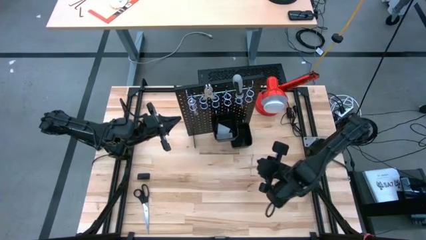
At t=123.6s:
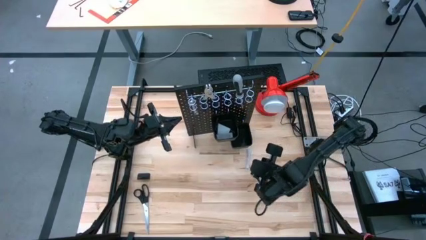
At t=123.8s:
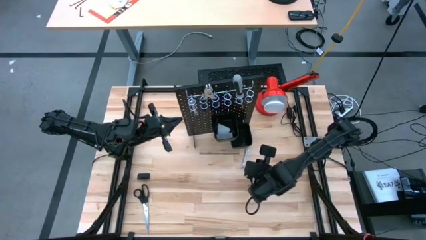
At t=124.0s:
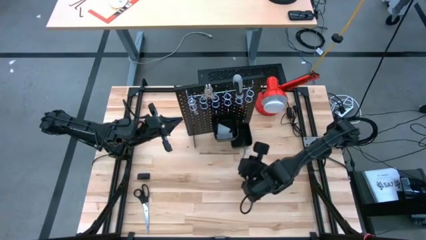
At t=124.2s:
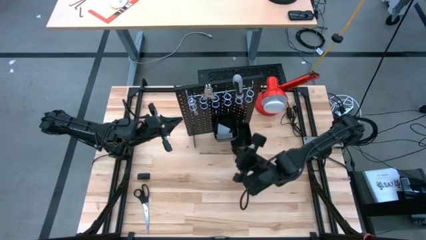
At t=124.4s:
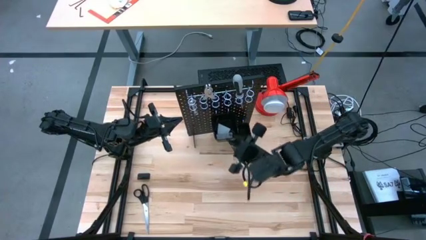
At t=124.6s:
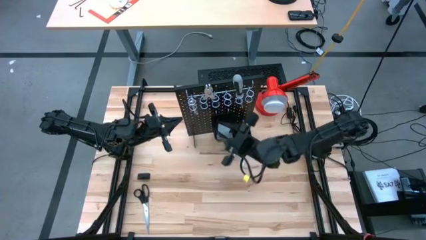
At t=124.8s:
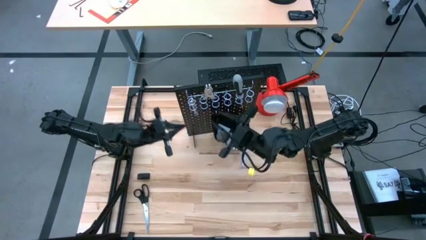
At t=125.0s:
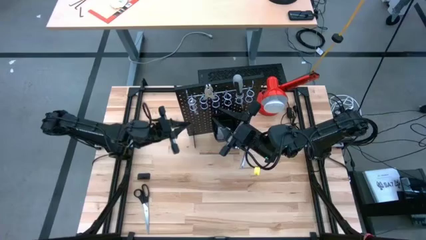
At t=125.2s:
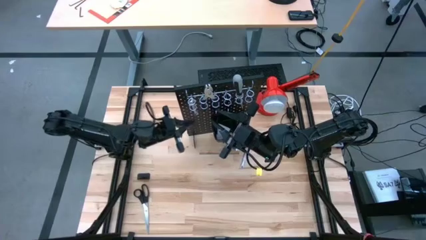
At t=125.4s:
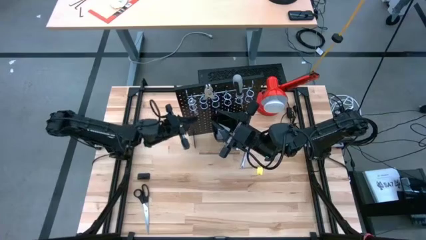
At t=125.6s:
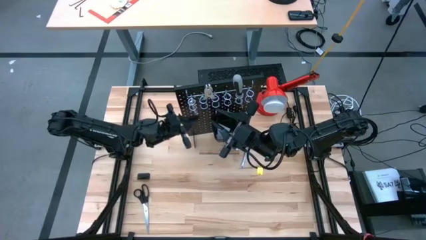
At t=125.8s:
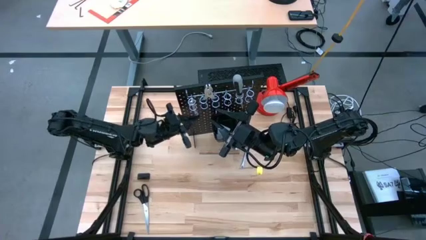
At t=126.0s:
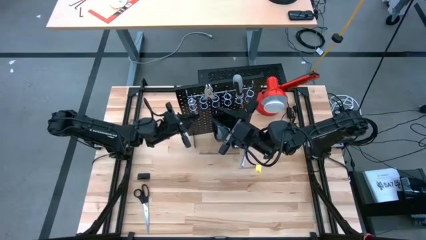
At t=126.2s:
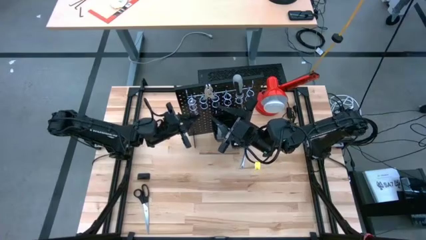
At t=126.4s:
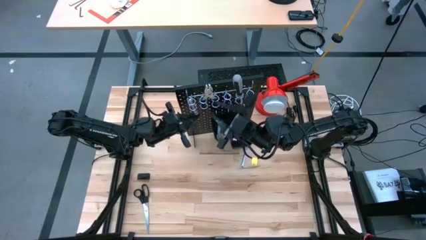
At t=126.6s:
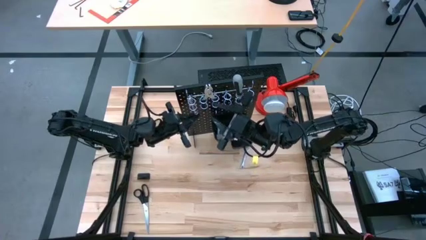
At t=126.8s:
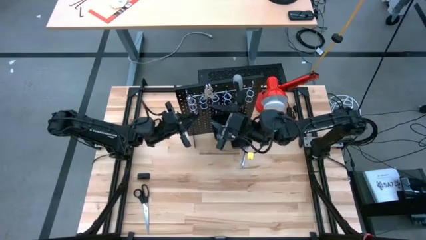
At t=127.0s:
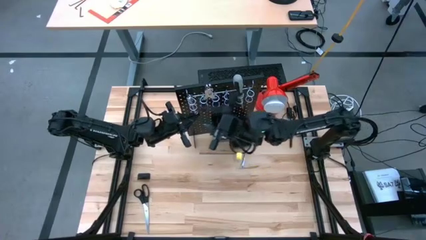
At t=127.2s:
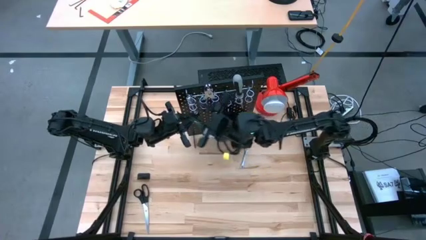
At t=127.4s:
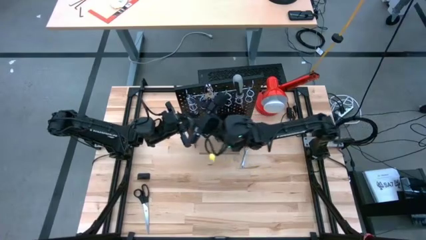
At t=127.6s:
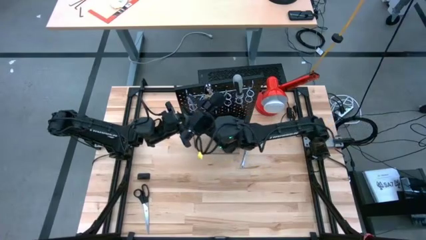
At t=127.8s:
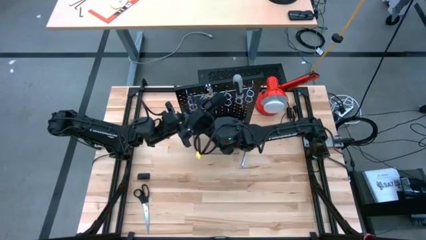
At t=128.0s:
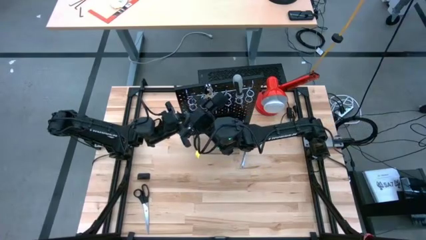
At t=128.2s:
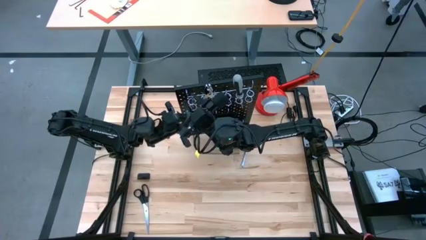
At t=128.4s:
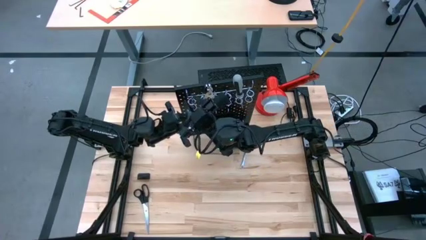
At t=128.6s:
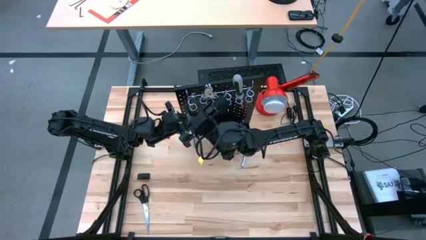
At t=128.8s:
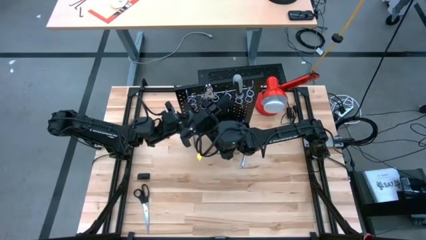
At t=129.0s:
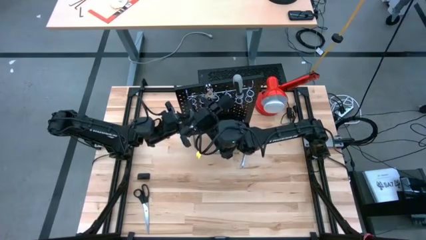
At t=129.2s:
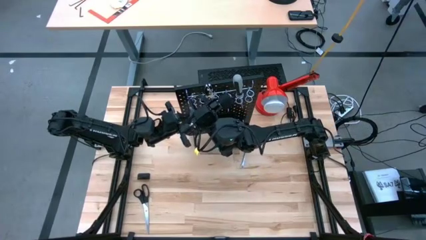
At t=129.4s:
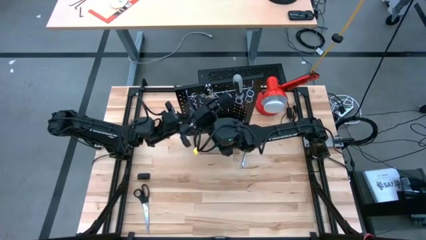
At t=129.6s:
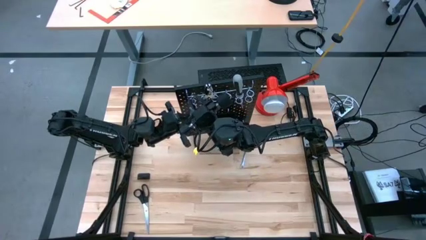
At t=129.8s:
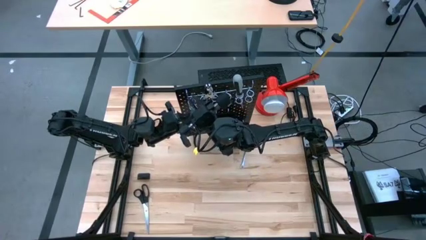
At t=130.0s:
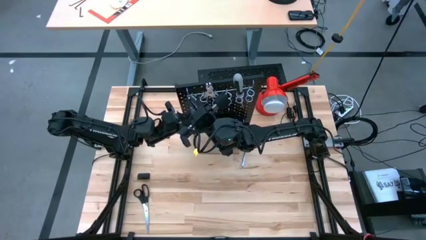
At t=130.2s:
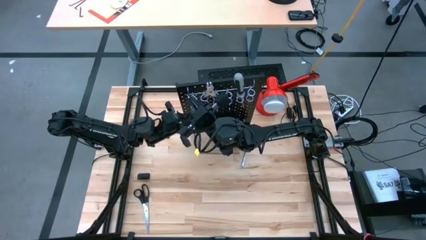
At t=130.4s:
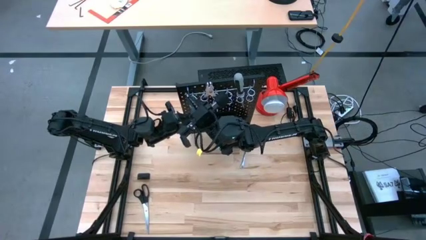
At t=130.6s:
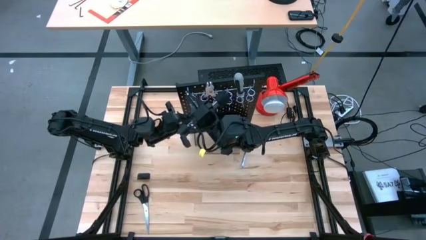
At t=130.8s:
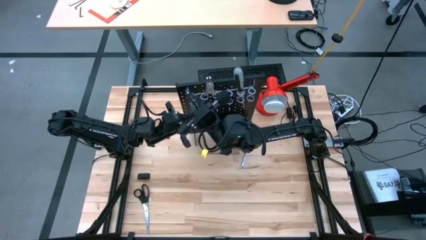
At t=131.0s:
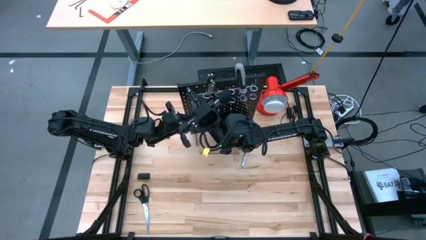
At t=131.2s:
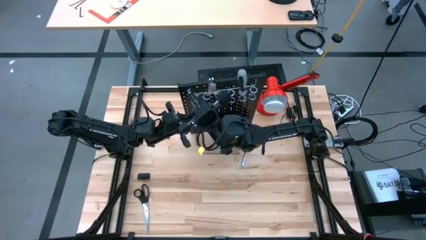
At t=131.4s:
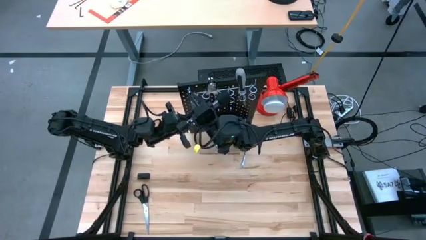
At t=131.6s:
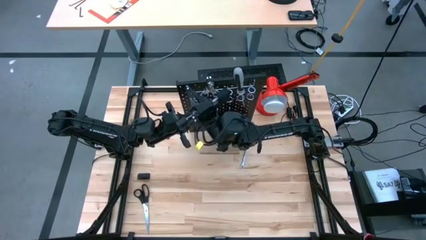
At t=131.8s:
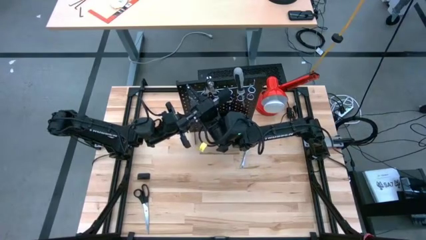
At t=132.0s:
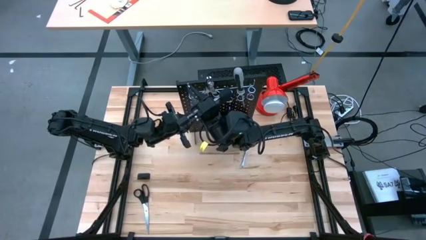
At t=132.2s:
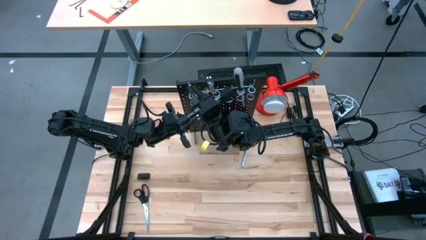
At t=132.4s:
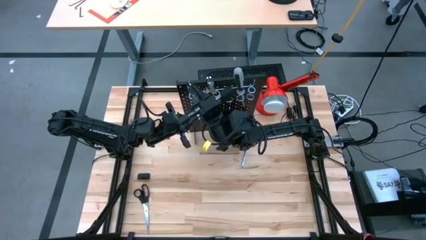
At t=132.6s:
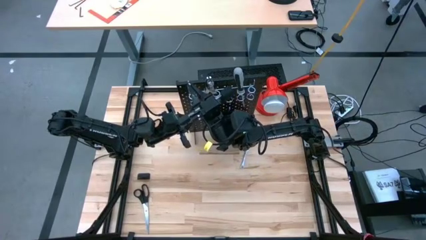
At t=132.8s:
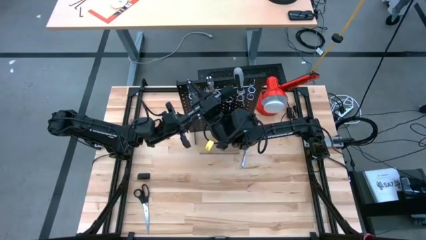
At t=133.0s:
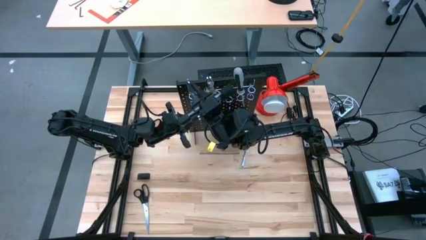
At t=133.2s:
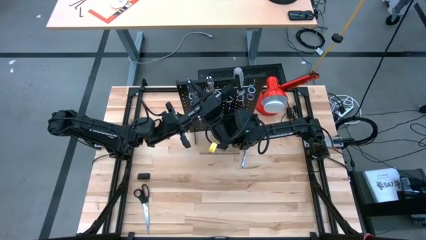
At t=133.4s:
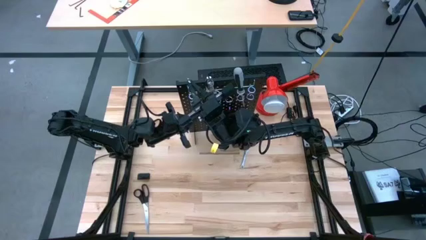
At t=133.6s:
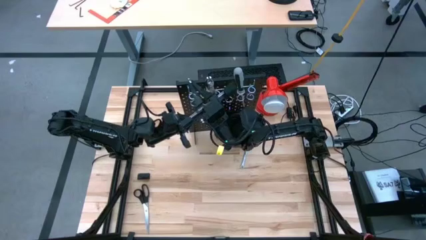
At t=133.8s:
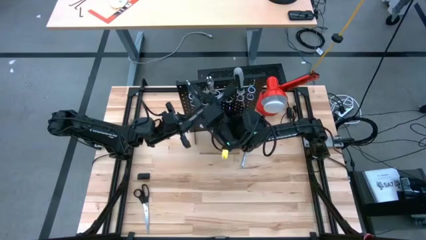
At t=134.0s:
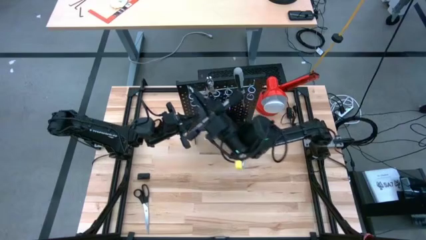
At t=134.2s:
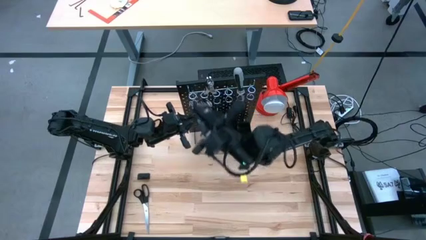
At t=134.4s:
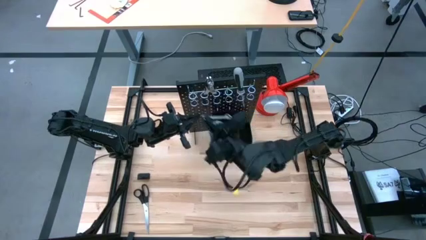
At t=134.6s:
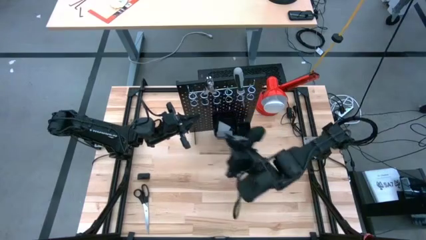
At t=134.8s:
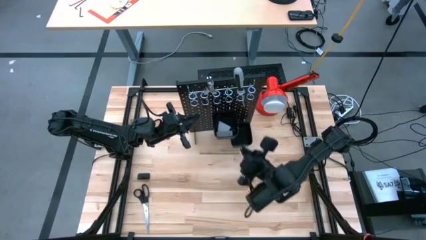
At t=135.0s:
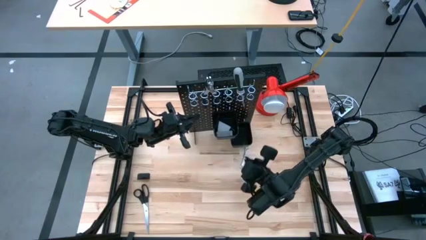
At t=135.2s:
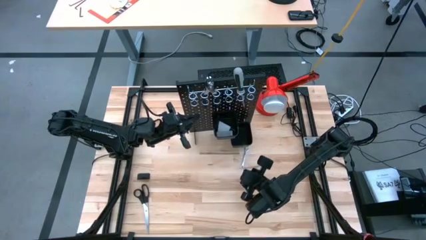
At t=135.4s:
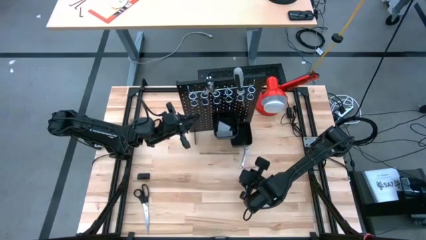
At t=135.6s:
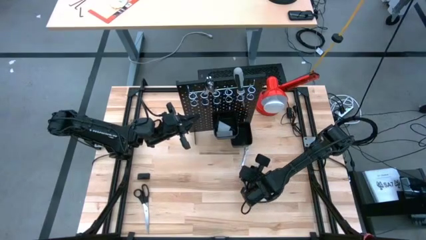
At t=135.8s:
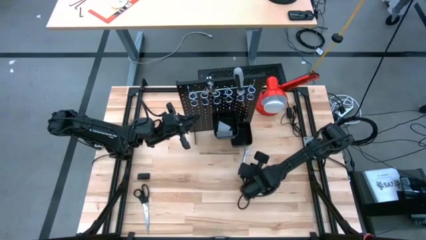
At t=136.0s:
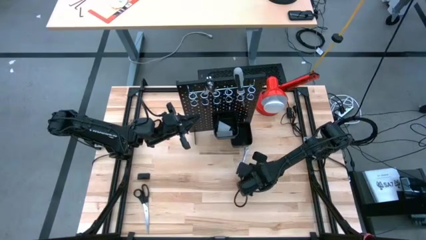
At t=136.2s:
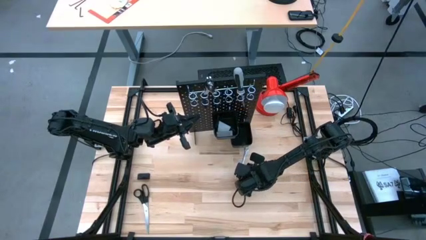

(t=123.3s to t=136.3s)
Task: Hang tools onto peg board
Unhang the wrench from the pegboard

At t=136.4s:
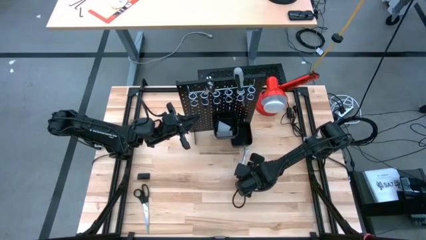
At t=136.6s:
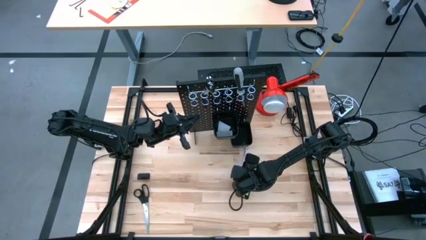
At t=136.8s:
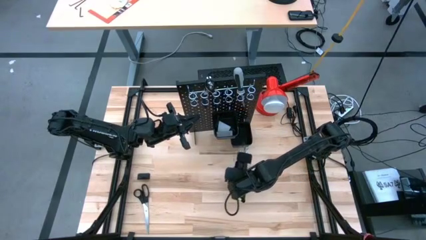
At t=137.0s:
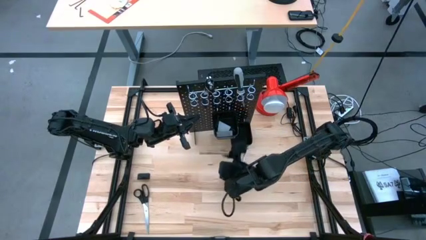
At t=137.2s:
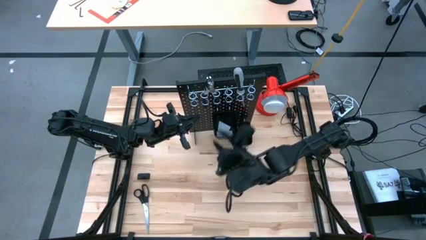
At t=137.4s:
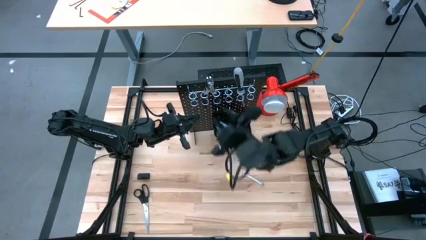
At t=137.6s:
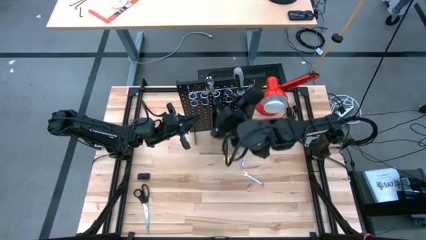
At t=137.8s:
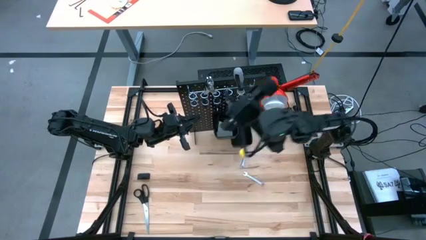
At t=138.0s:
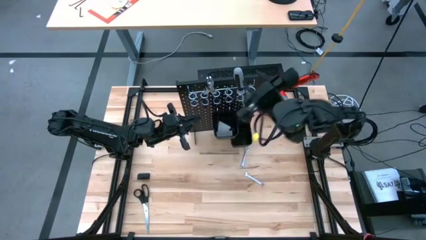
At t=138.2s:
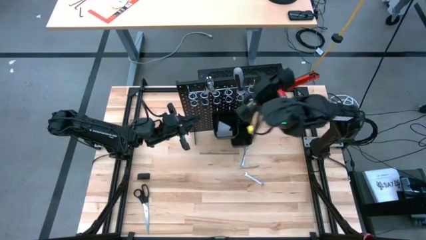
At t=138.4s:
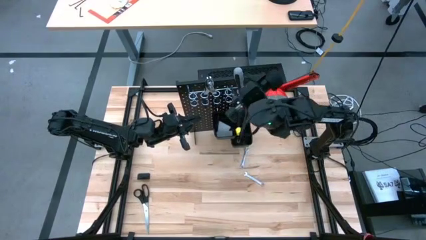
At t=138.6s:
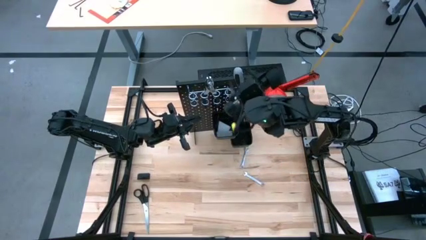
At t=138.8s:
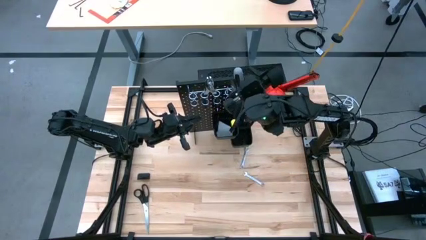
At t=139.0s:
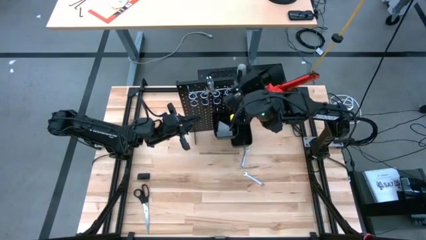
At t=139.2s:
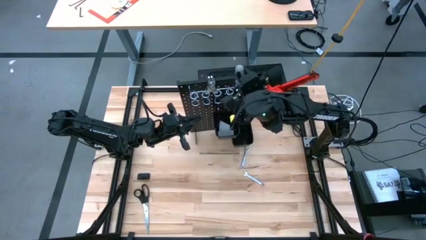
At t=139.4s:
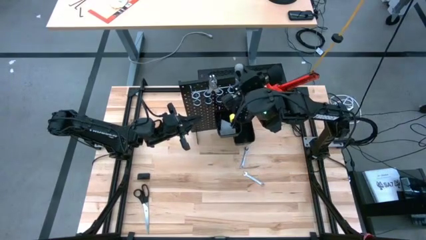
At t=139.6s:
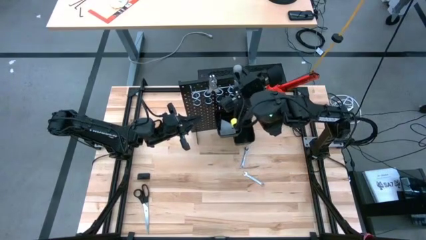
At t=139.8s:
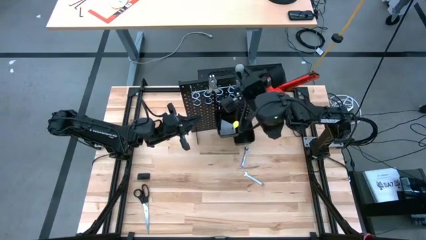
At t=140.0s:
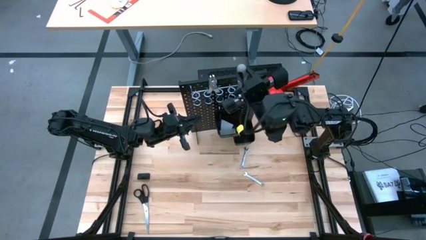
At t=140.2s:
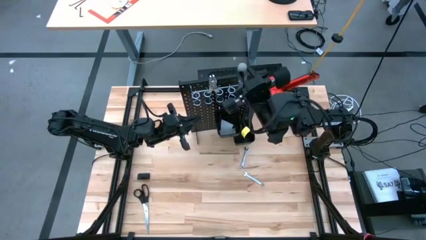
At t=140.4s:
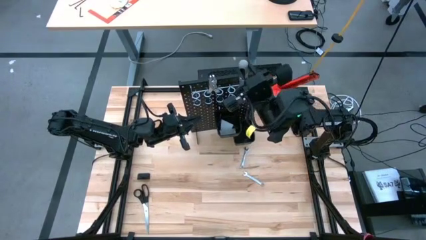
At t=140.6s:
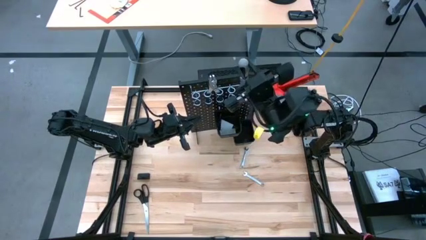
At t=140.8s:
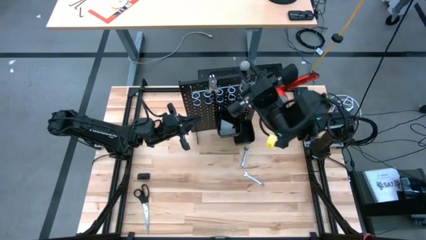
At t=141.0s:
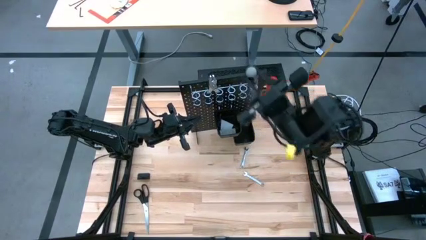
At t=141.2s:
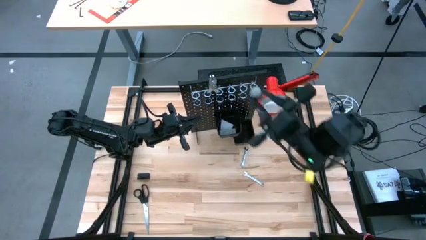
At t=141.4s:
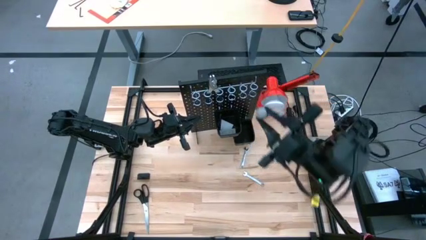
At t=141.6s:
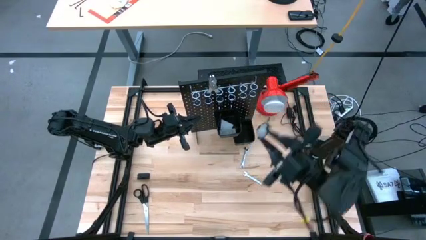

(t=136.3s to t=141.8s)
Unhang the screwdriver from the pegboard
